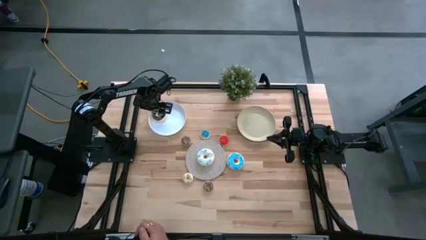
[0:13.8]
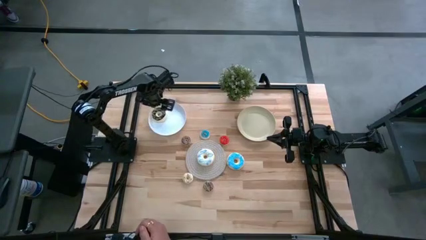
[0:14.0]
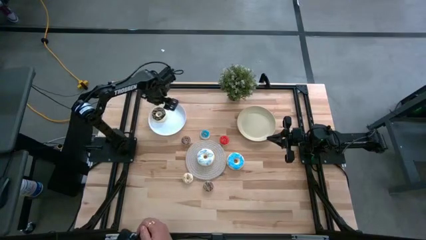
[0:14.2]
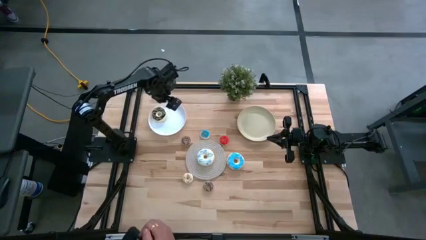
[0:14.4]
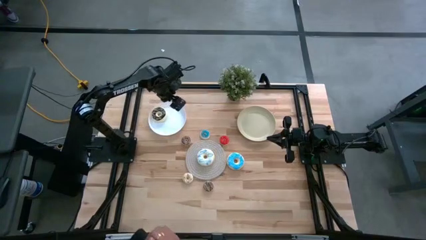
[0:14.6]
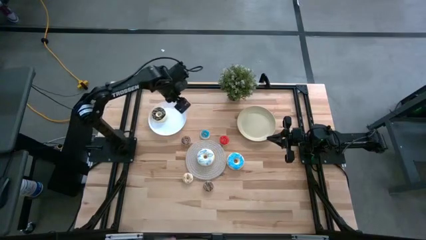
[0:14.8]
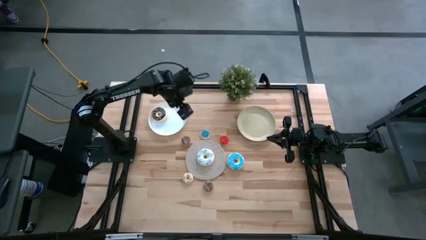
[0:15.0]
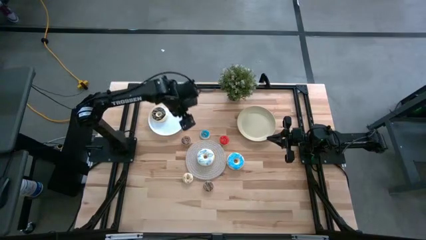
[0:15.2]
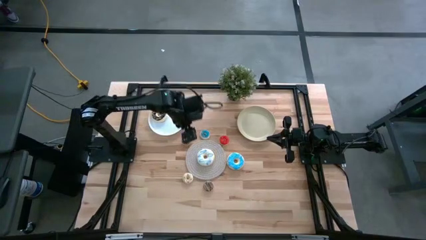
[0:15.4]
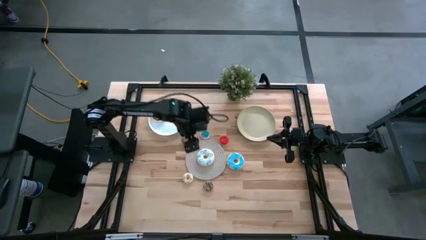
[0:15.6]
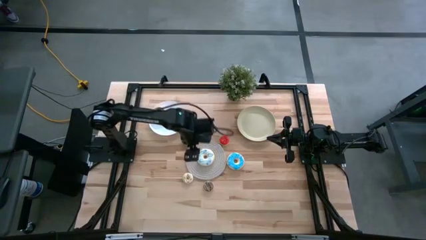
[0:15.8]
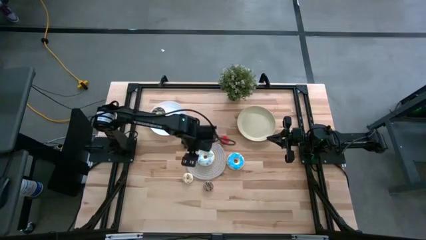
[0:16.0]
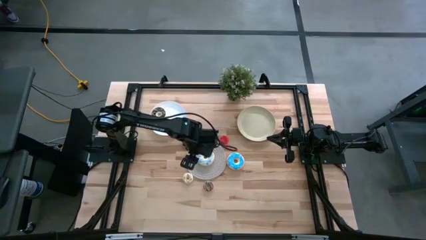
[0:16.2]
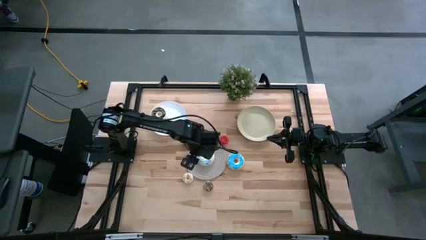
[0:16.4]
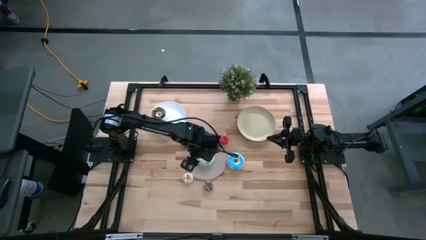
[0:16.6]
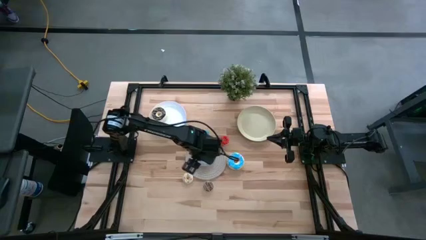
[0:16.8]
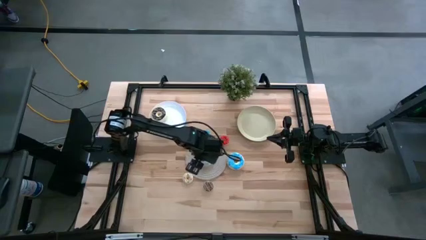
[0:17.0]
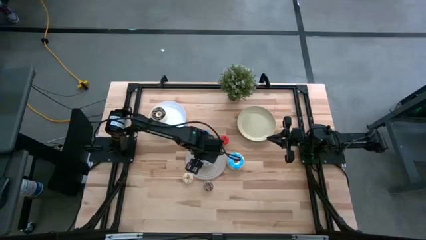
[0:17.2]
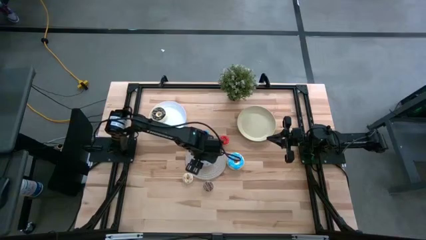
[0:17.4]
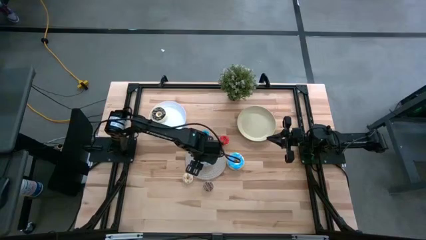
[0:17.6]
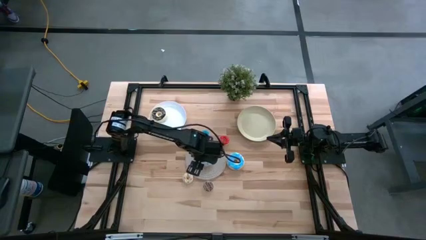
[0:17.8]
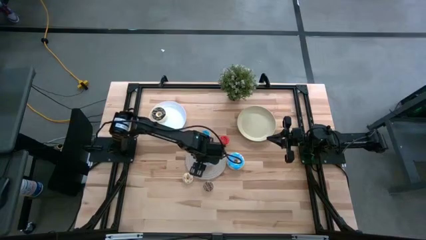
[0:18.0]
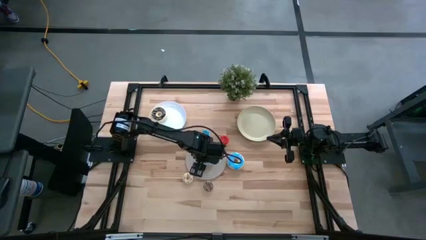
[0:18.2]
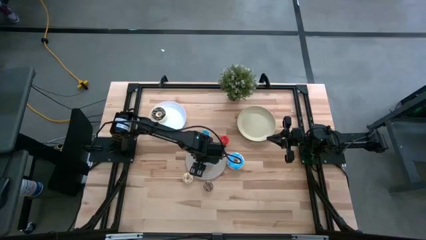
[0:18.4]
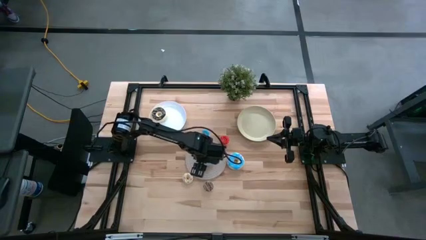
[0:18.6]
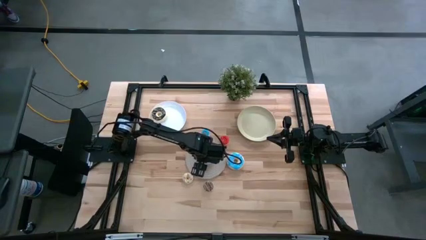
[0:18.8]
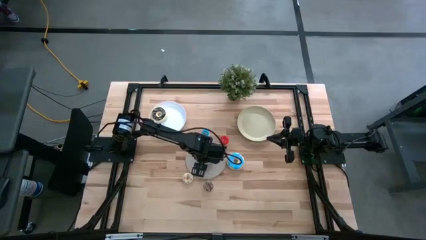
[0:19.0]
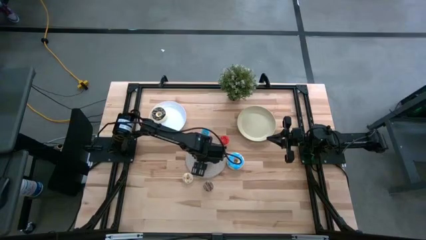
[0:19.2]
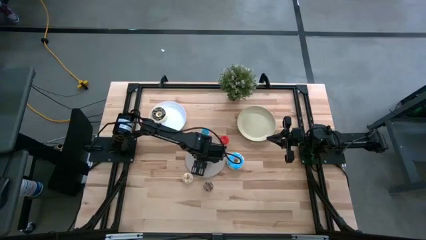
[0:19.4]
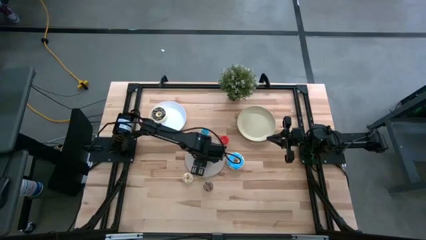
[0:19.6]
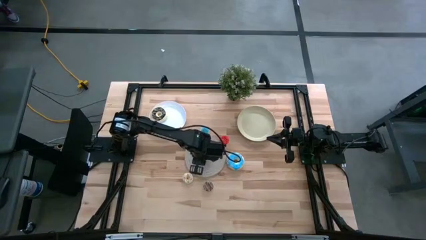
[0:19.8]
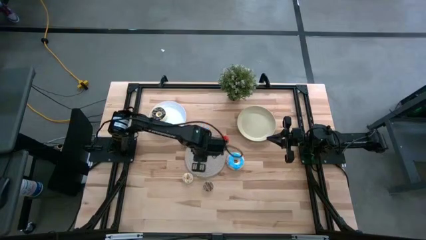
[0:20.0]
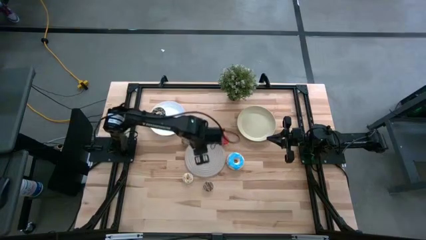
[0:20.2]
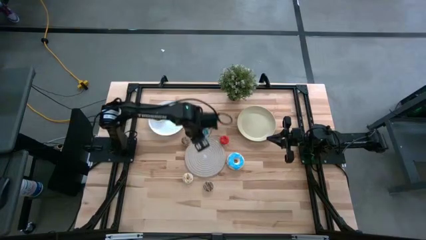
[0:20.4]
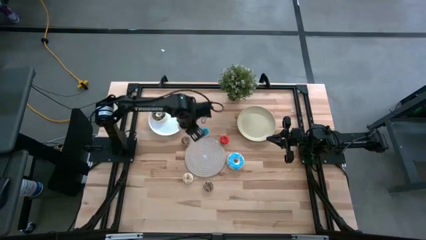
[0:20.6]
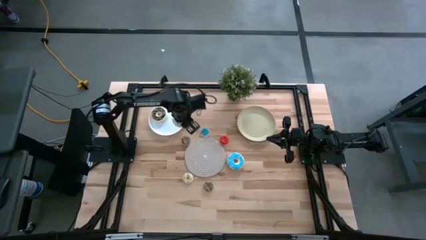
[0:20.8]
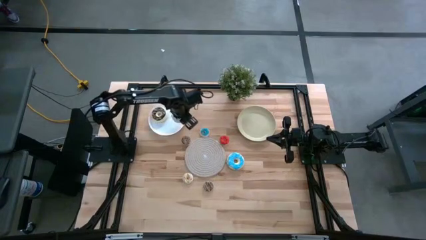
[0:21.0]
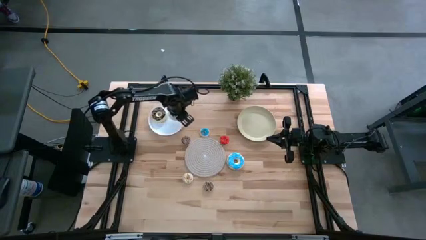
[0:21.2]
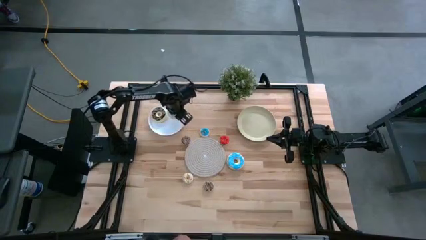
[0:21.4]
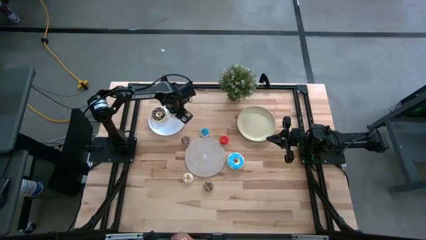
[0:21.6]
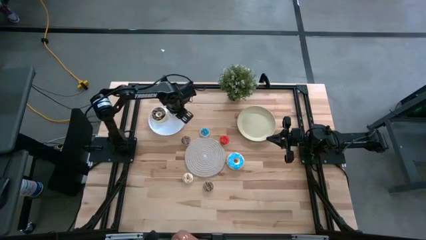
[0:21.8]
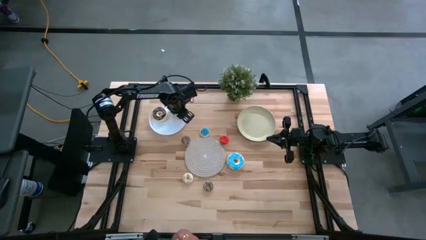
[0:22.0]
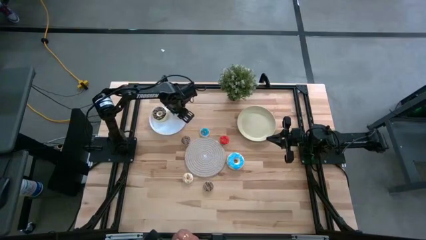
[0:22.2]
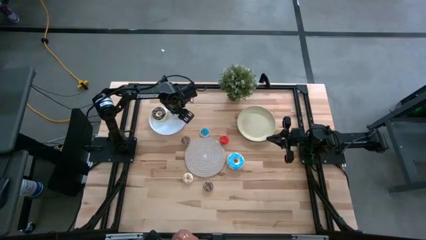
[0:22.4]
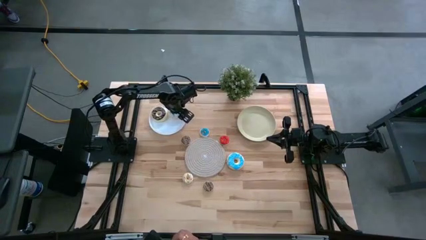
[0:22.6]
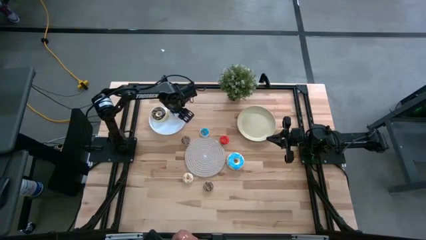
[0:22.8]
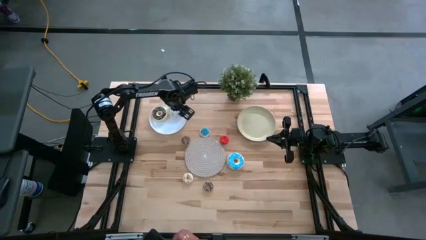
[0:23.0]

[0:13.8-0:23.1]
Task: Pick & Place donuts
Put the large white donut on the white plate

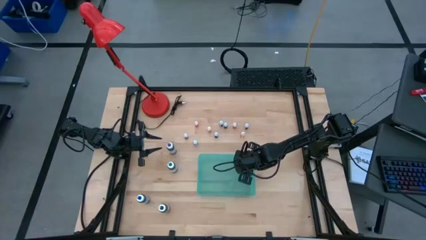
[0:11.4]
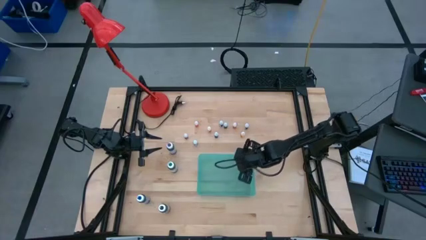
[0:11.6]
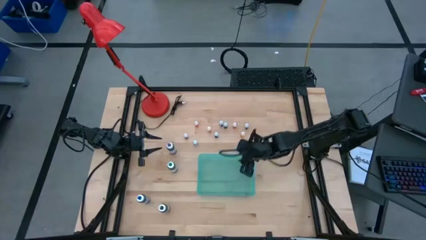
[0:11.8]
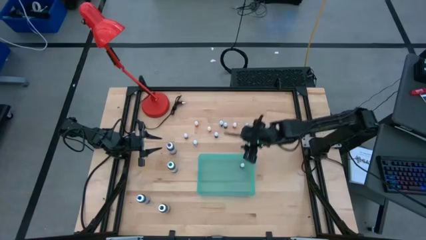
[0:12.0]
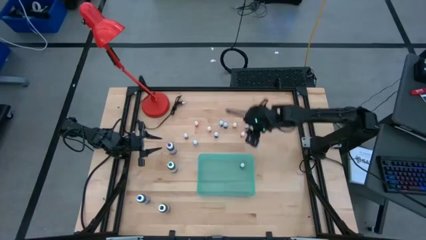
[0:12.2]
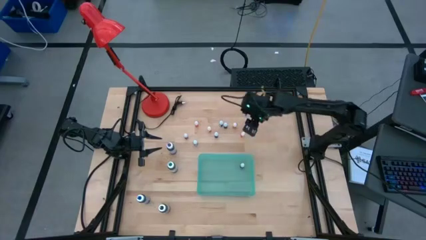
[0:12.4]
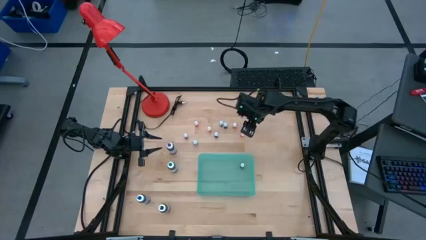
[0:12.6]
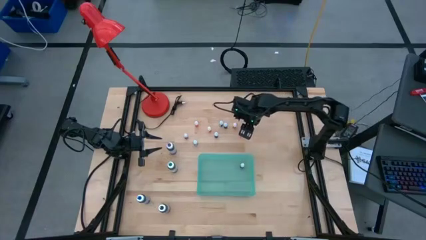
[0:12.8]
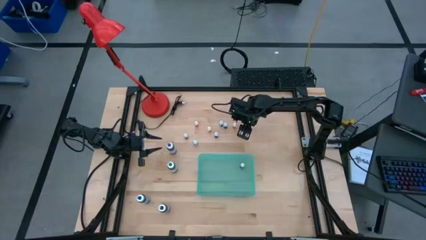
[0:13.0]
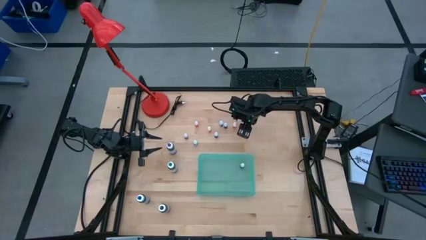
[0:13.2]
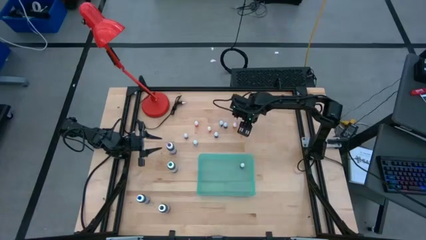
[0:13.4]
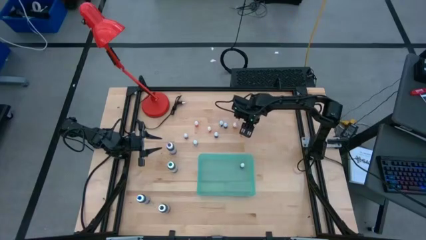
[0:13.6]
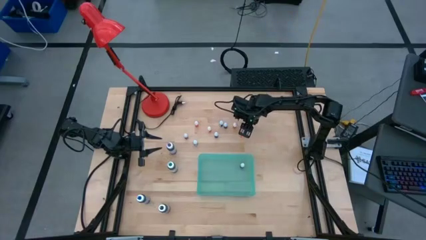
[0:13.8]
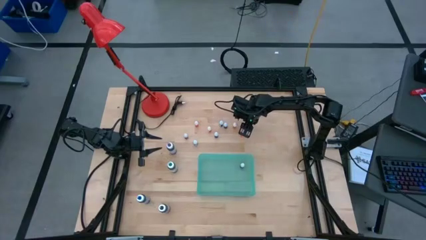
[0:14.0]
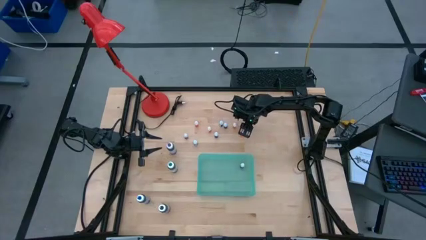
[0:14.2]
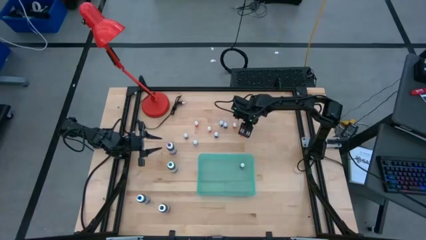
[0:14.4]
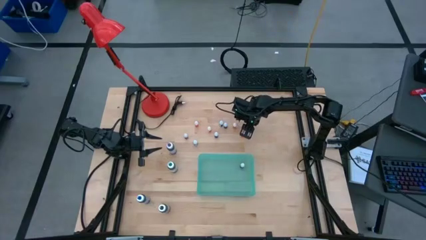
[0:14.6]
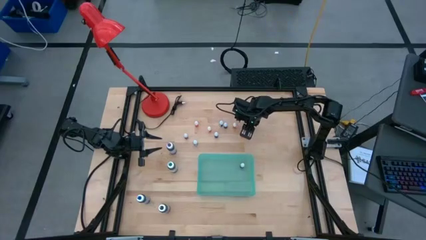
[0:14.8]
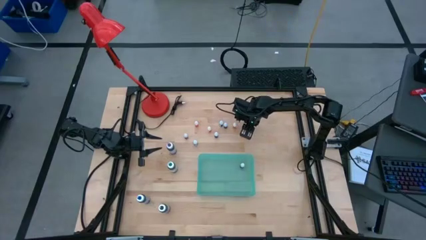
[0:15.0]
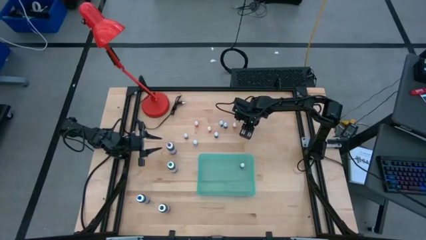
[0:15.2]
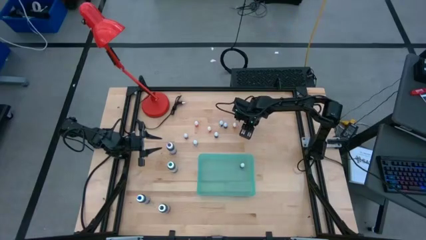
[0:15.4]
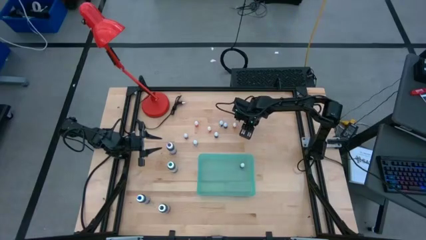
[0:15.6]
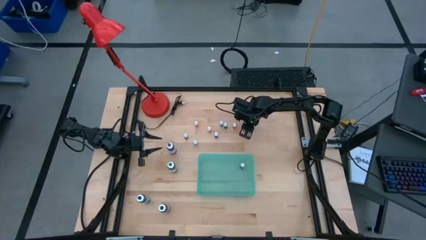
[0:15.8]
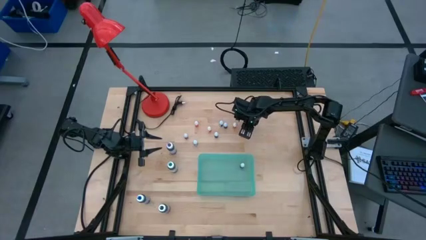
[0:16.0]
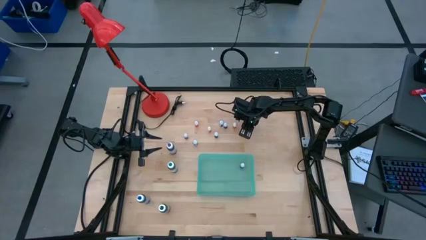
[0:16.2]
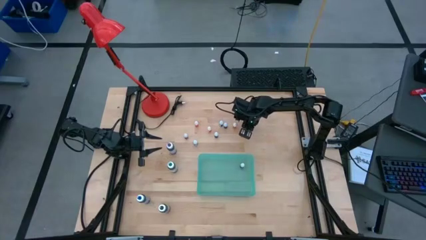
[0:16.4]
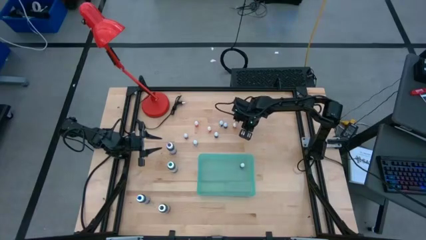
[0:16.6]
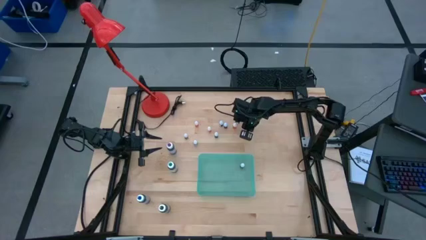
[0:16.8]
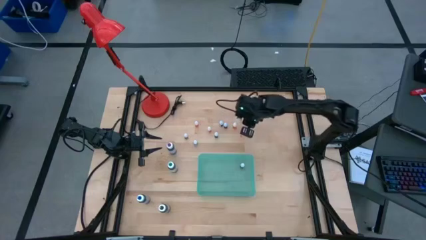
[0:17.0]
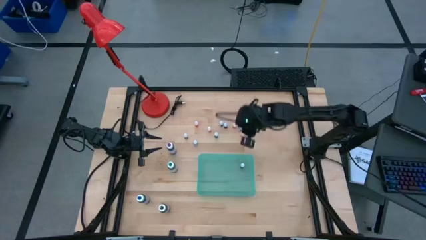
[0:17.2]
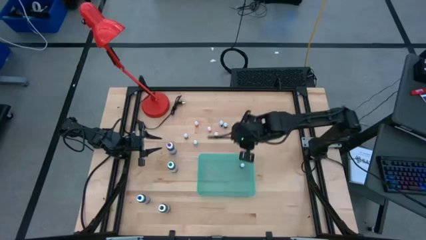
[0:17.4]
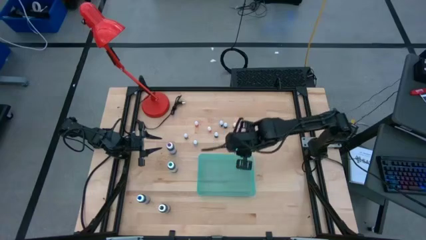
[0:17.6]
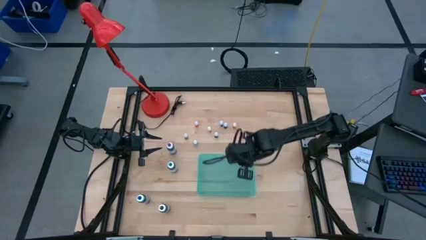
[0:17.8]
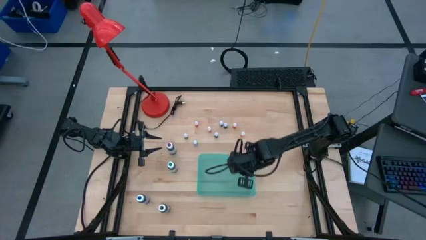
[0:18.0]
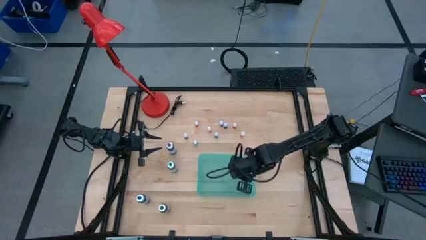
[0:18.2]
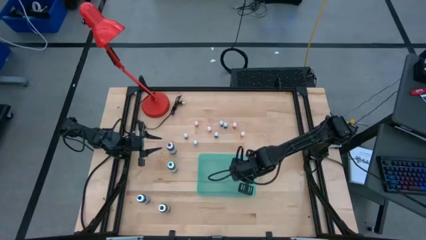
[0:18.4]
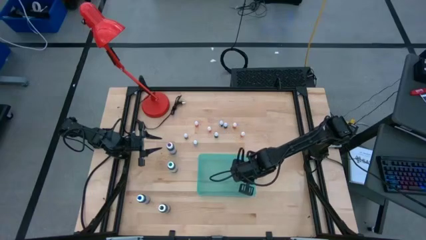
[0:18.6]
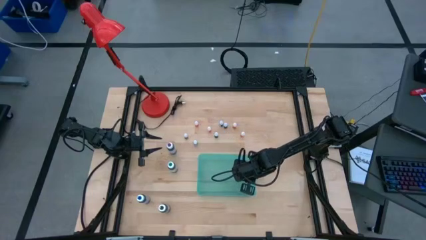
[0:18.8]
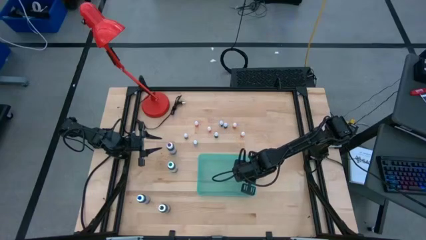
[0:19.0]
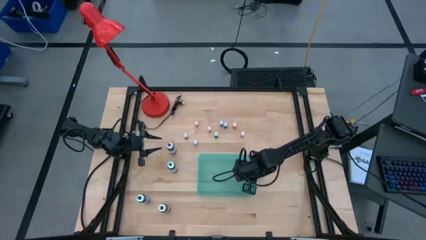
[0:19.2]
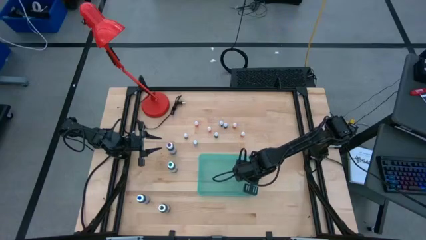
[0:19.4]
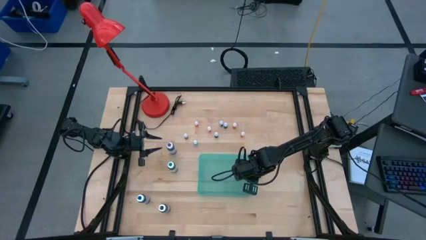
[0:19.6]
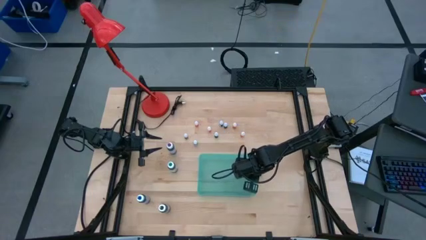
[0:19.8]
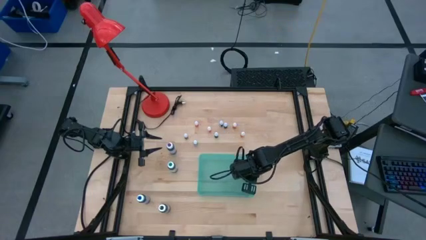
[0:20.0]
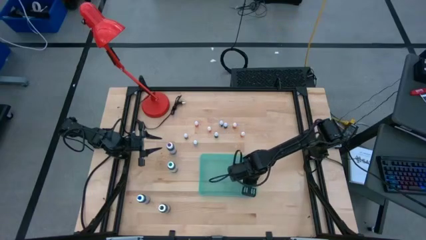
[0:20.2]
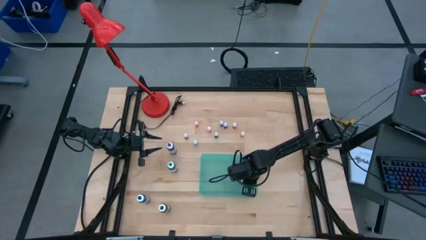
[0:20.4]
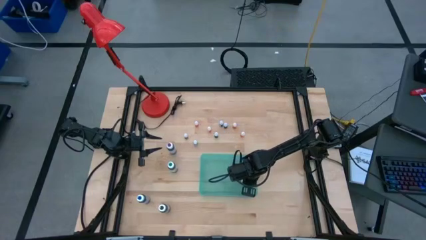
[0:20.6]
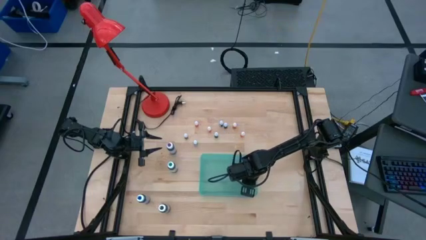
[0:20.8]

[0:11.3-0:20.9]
Task: Pick & Place food coloring
Put the small red food coloring bottle into the green bin
